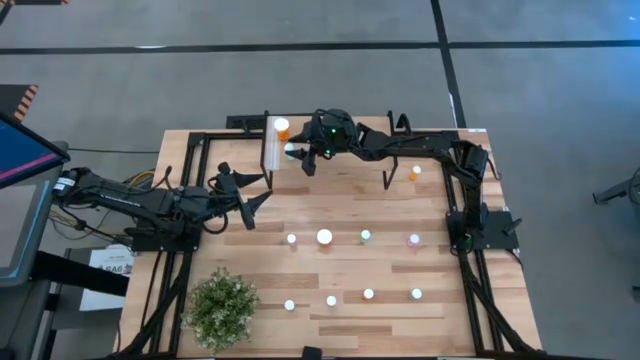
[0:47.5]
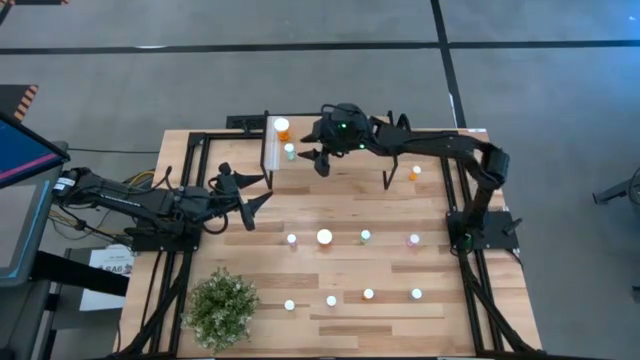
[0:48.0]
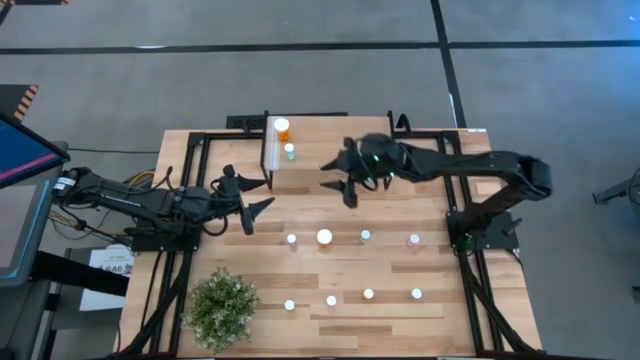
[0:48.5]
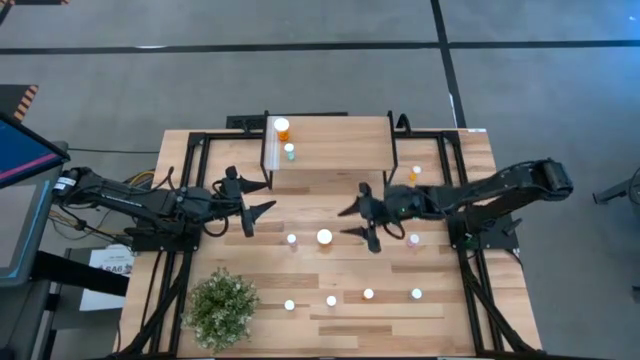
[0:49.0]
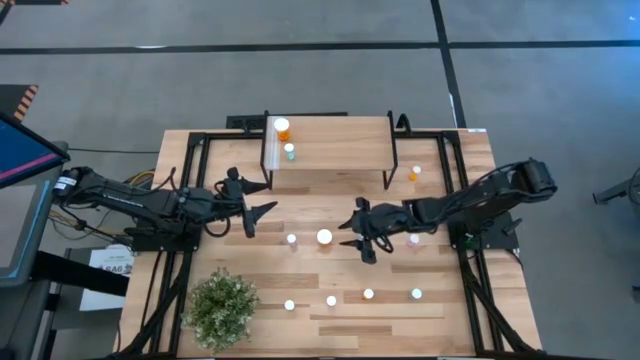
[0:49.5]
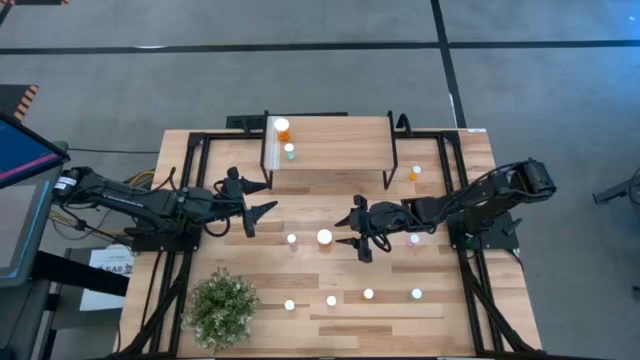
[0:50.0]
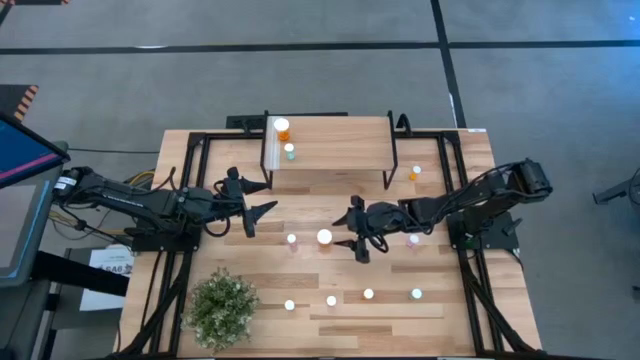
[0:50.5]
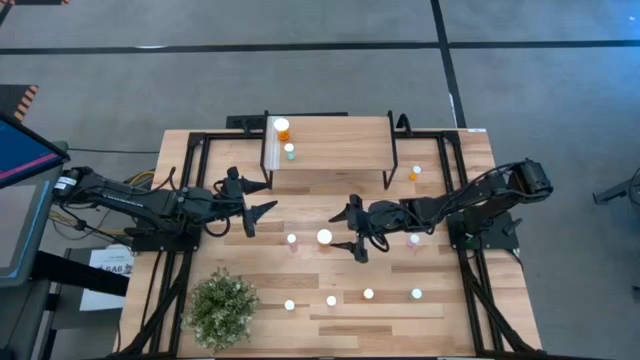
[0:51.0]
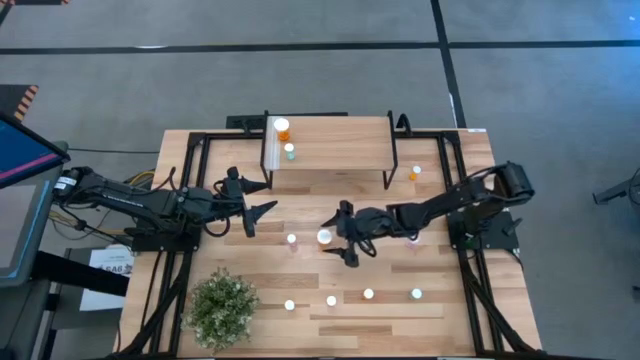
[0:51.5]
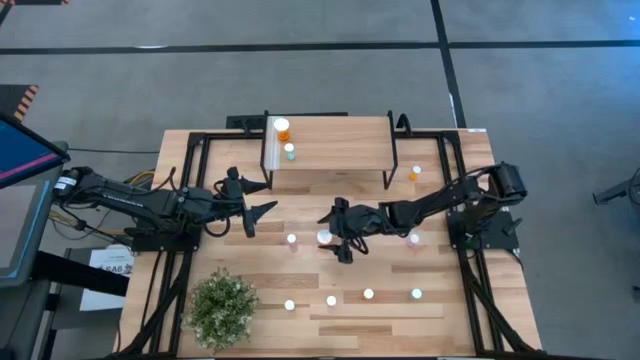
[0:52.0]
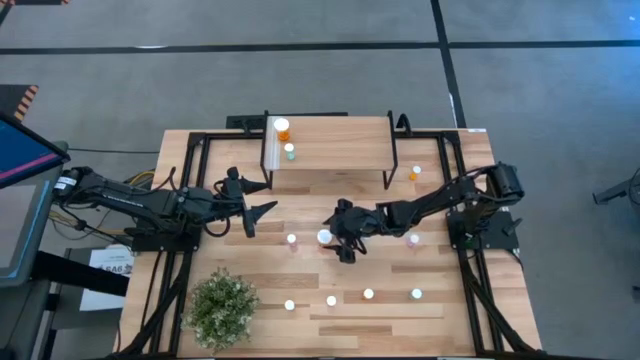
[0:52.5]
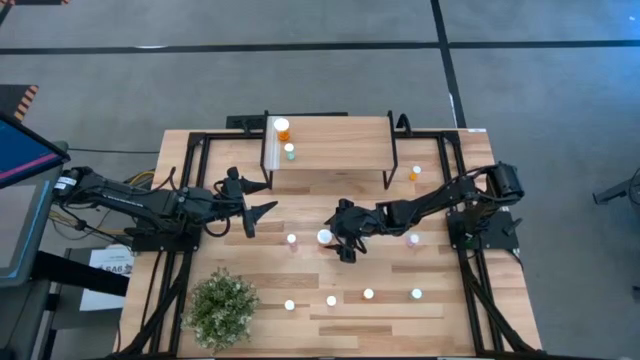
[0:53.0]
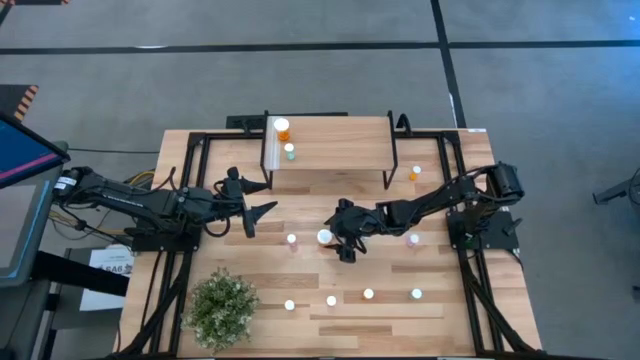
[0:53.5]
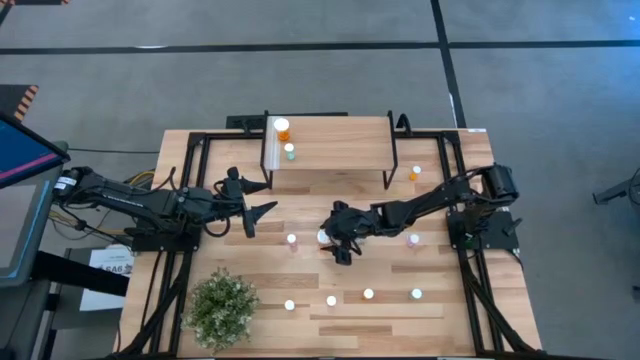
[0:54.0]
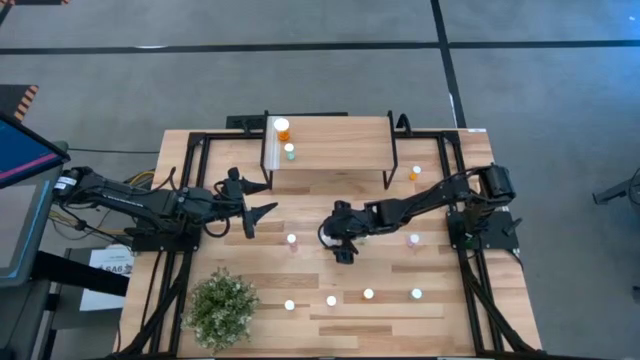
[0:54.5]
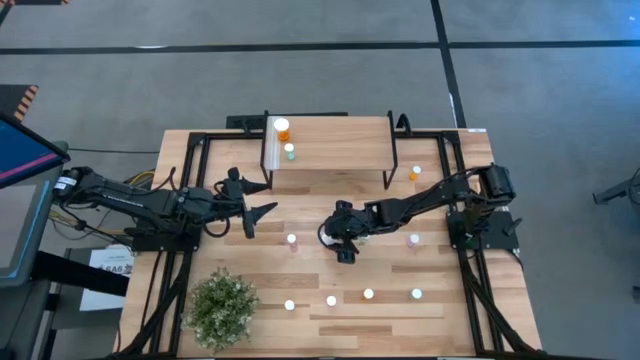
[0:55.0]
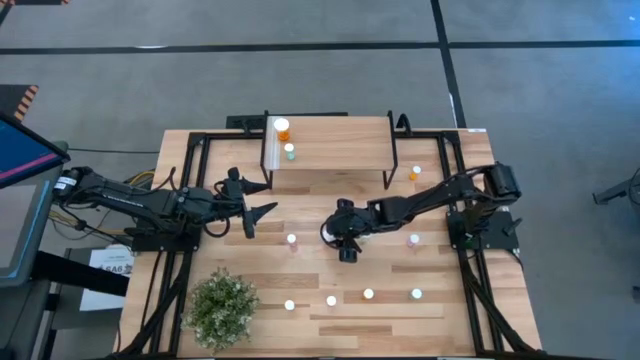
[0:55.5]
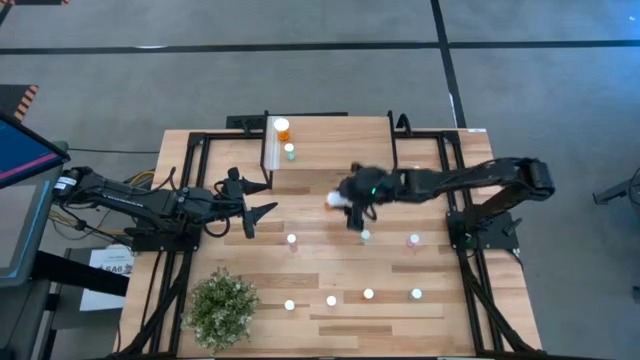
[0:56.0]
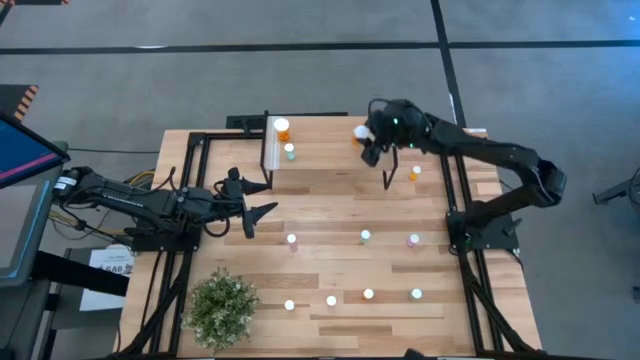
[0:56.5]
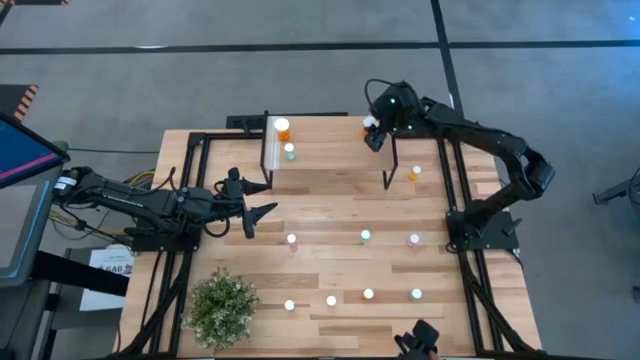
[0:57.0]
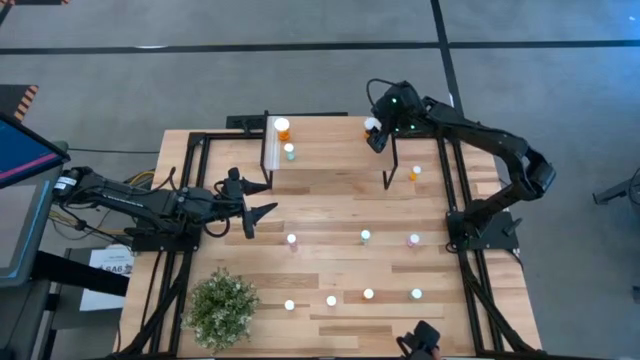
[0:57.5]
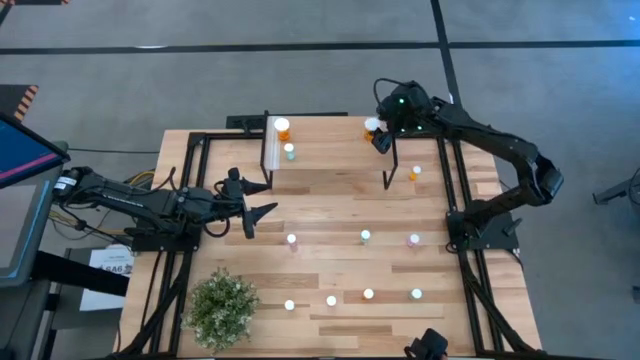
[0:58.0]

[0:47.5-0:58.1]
Task: Pick and place medicine bottles onto shelf by color
Put the orange pill bottle on the shelf

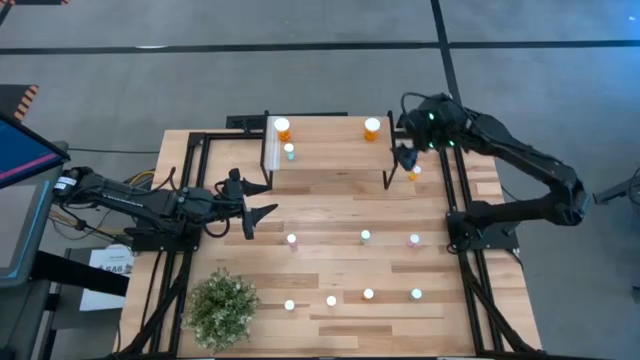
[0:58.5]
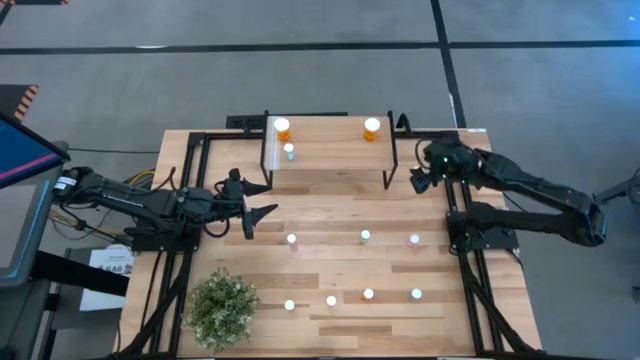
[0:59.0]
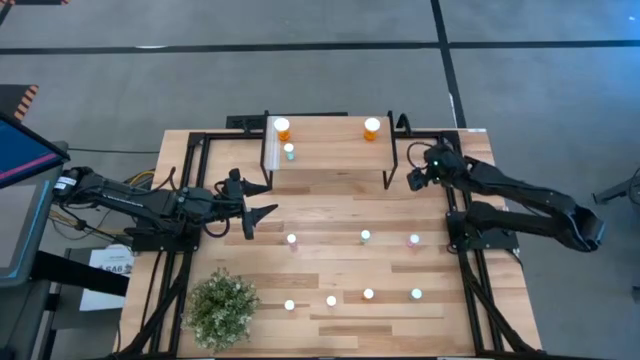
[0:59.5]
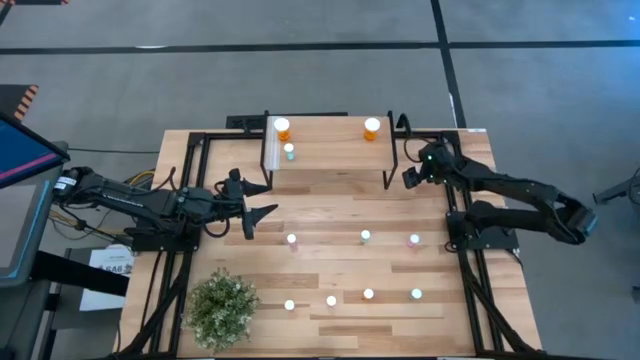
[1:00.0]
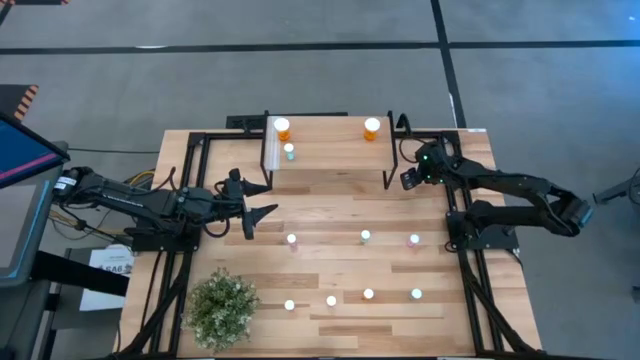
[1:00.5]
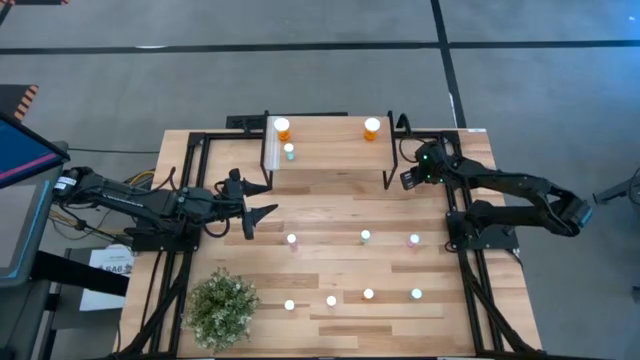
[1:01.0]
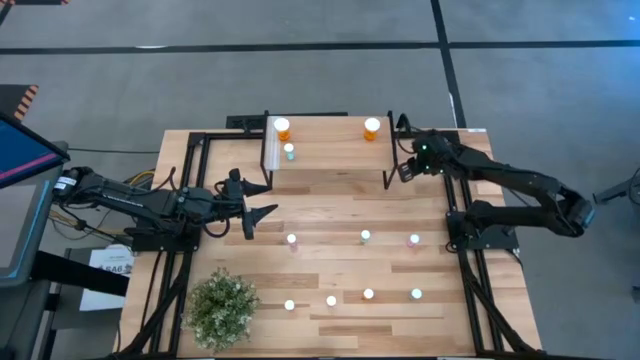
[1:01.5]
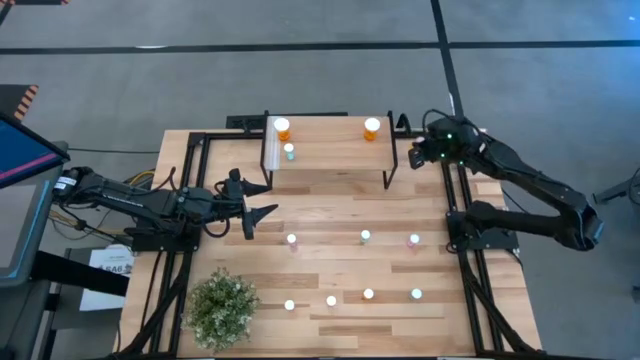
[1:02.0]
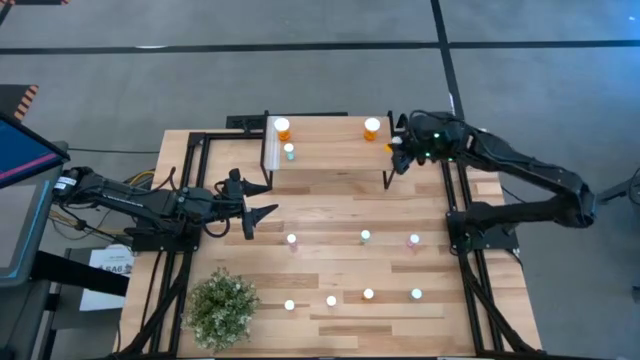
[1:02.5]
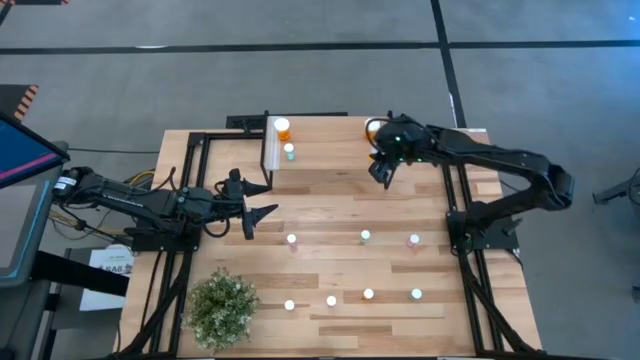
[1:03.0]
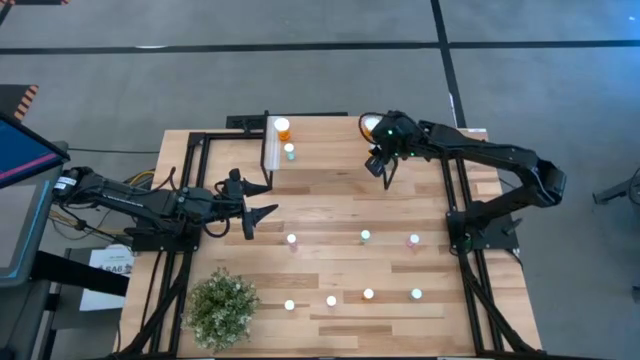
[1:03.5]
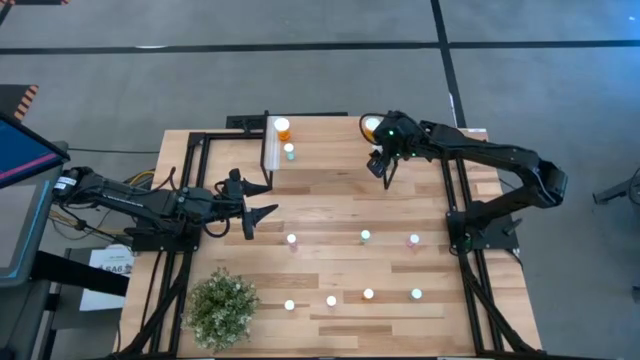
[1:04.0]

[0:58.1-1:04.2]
Put the orange pill bottle on the shelf

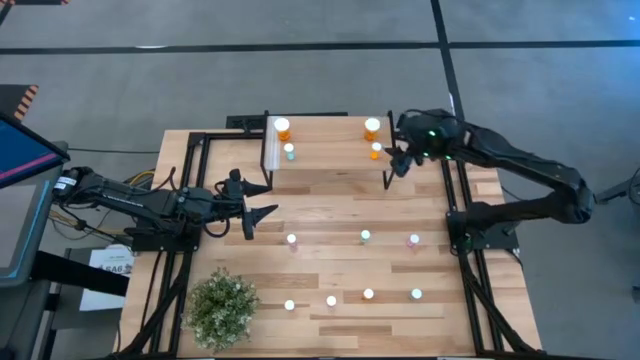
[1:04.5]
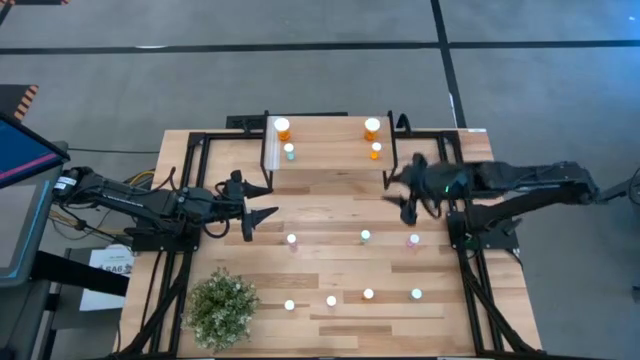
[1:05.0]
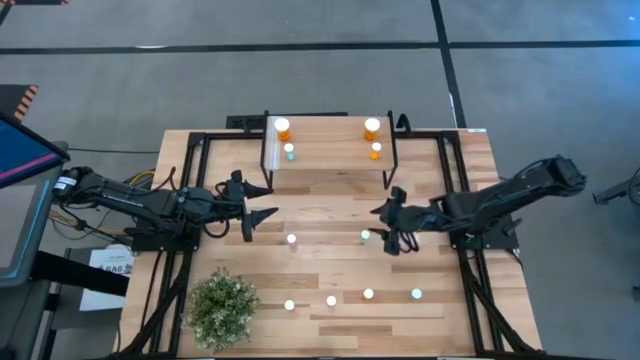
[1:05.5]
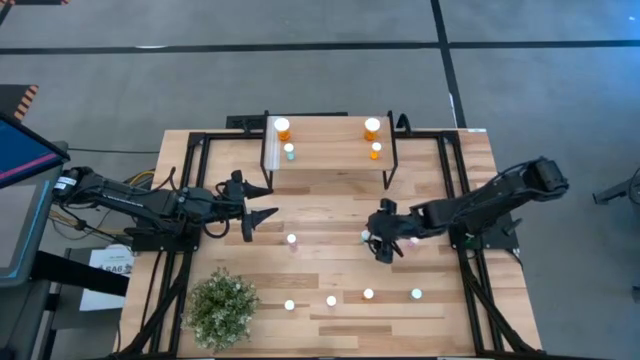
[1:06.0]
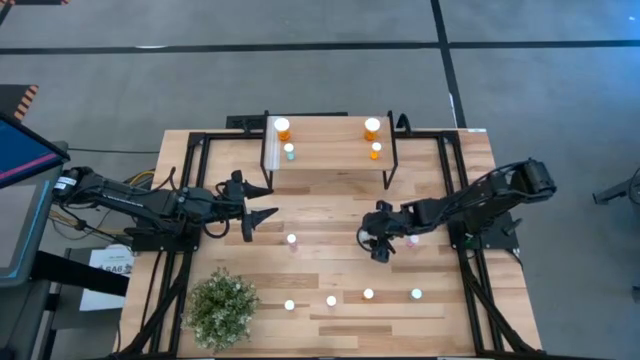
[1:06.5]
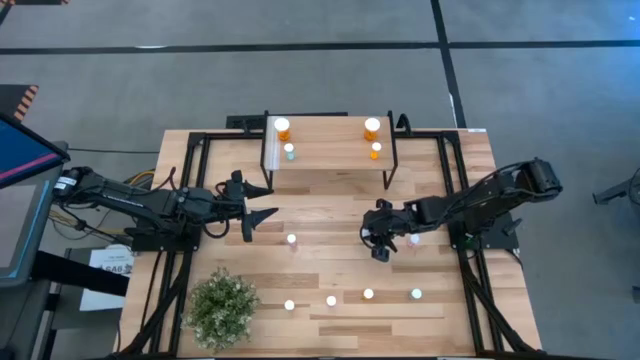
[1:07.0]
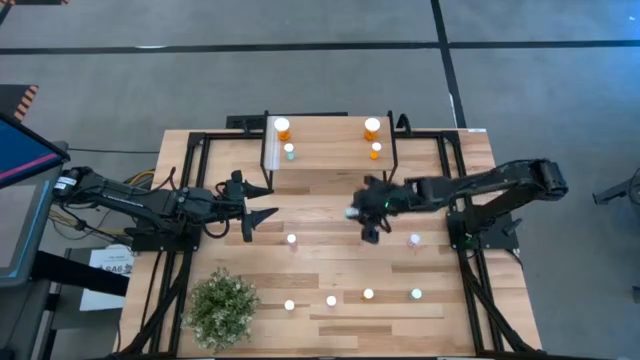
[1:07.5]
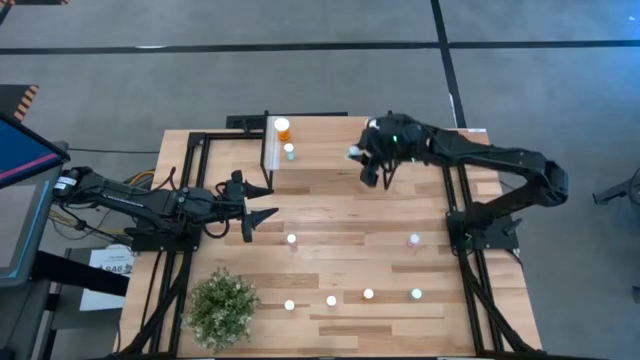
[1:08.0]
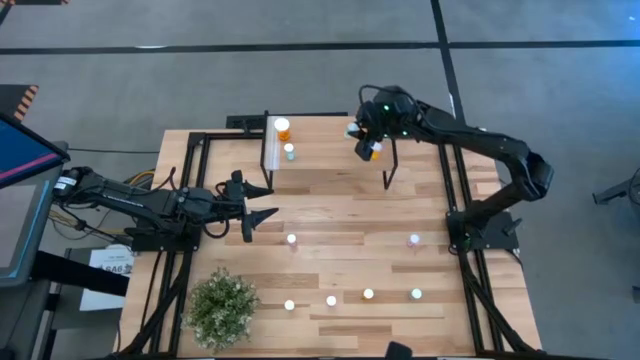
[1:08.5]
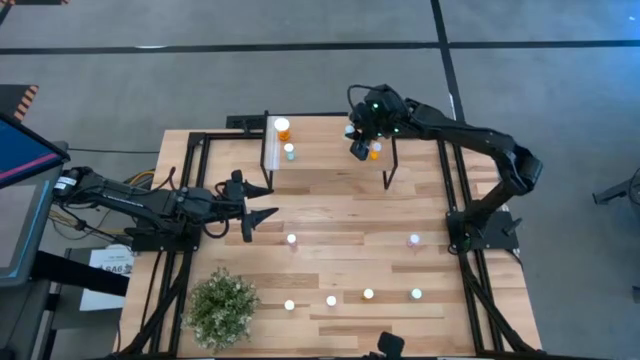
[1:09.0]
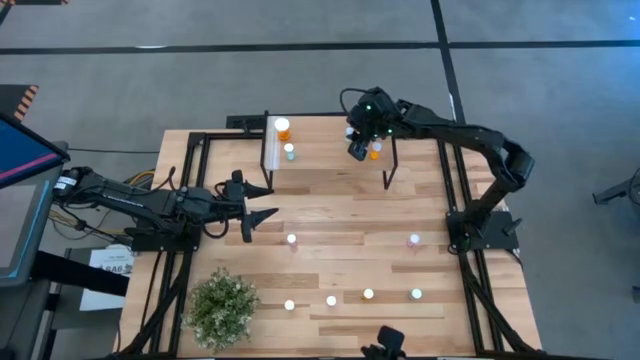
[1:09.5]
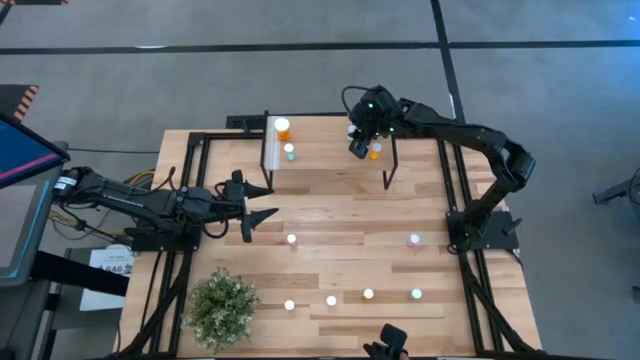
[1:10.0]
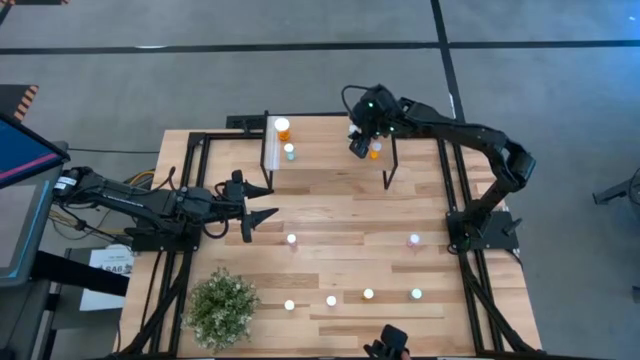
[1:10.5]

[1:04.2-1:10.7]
Put the green pill bottle on the shelf
